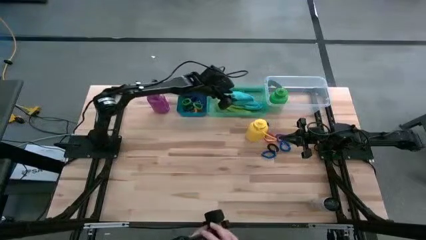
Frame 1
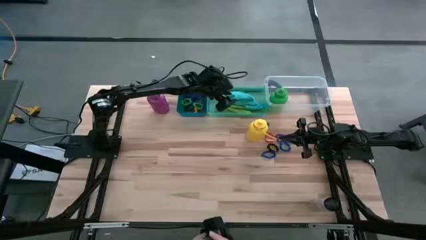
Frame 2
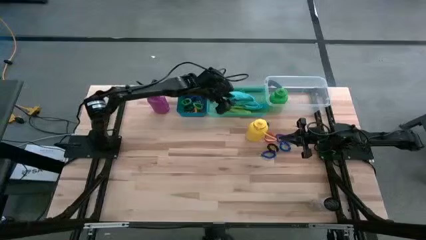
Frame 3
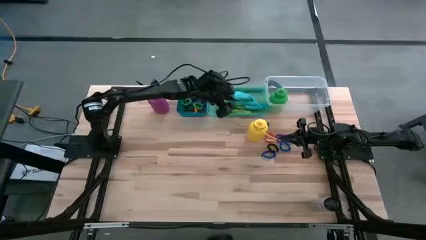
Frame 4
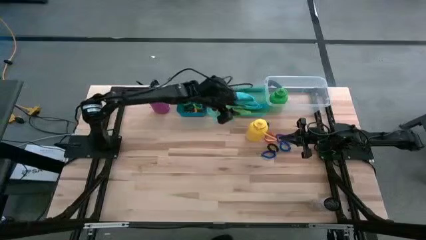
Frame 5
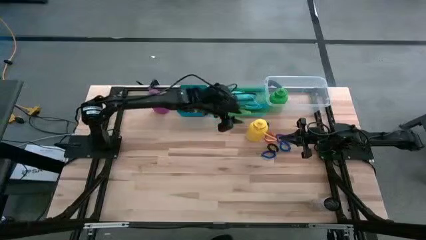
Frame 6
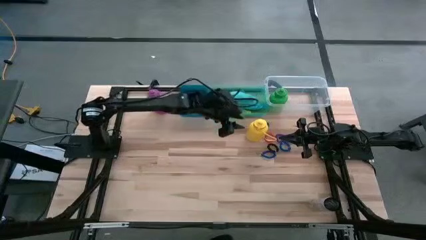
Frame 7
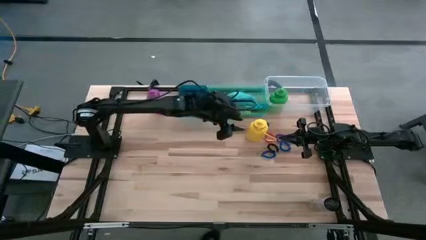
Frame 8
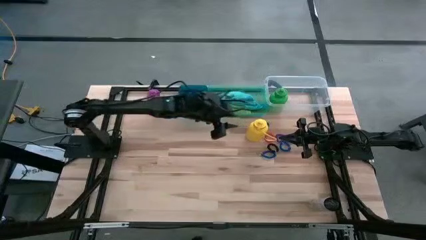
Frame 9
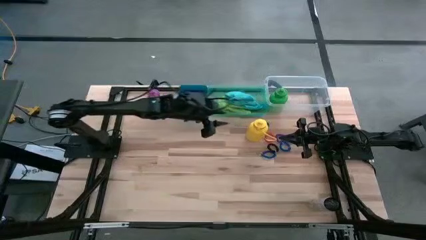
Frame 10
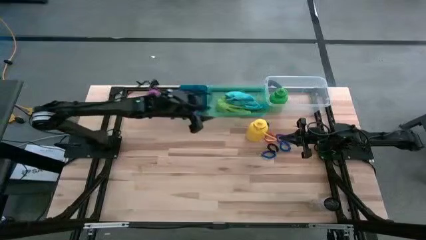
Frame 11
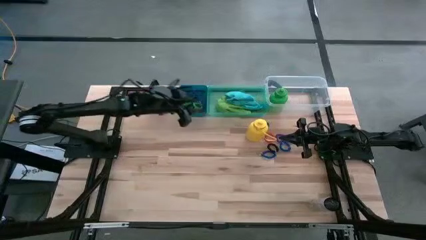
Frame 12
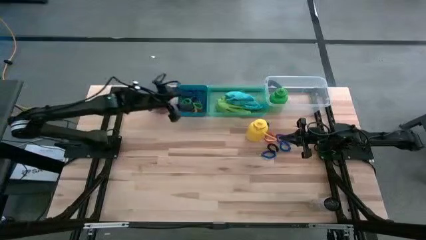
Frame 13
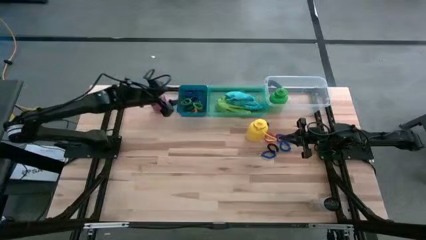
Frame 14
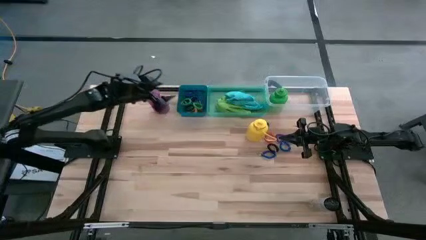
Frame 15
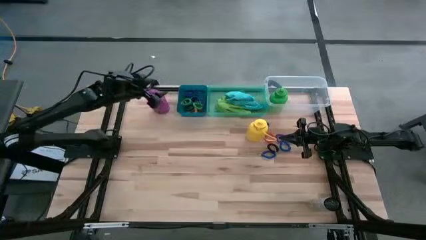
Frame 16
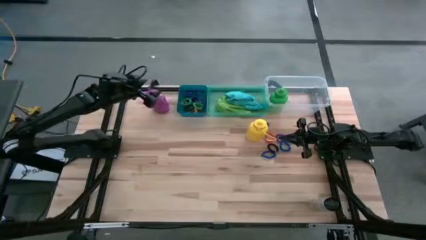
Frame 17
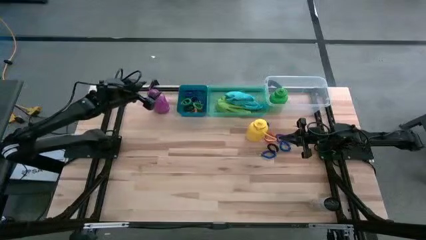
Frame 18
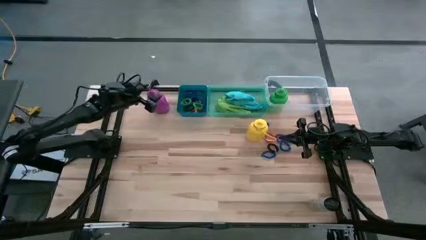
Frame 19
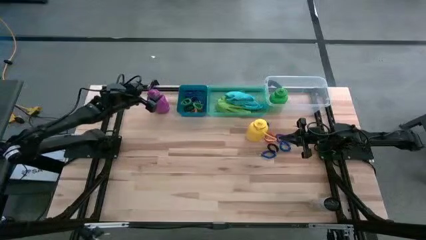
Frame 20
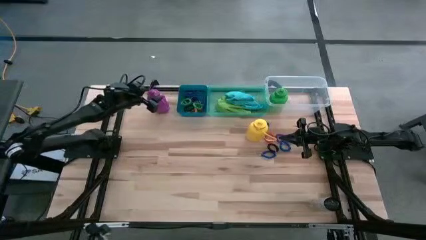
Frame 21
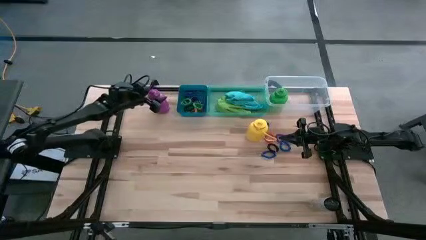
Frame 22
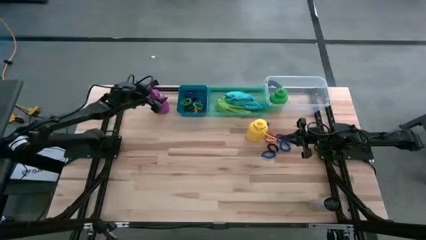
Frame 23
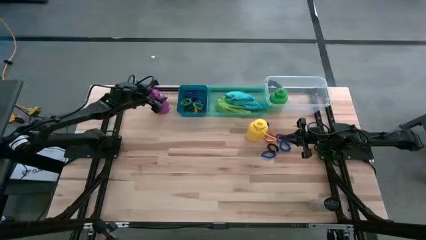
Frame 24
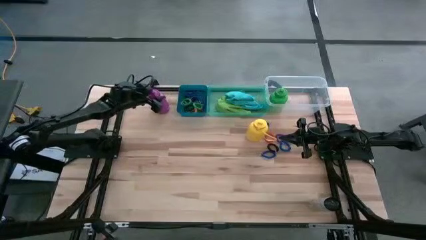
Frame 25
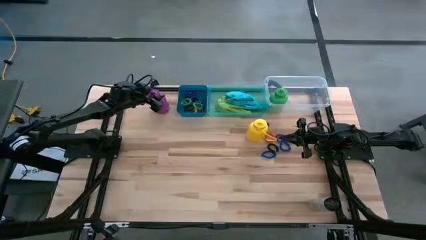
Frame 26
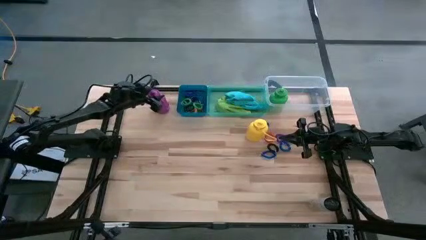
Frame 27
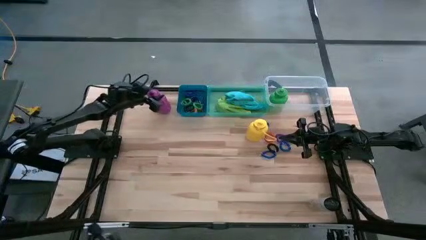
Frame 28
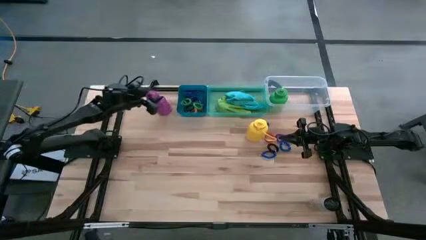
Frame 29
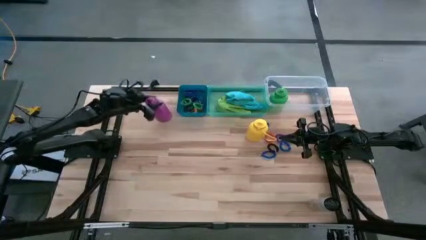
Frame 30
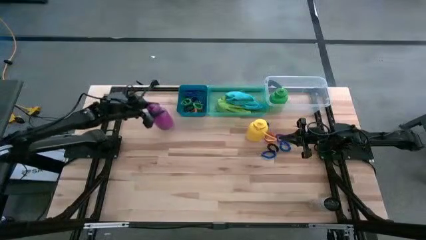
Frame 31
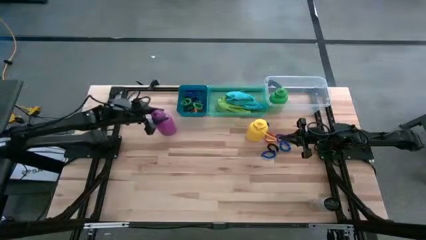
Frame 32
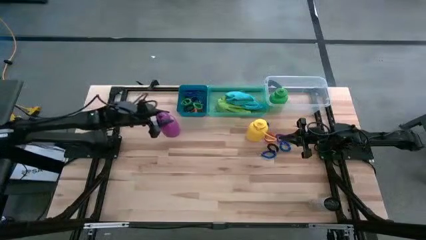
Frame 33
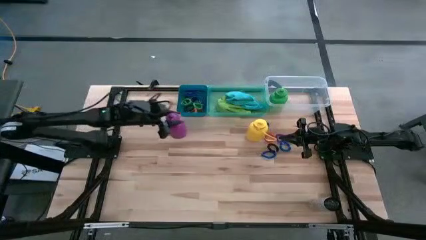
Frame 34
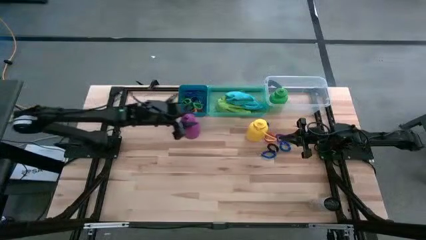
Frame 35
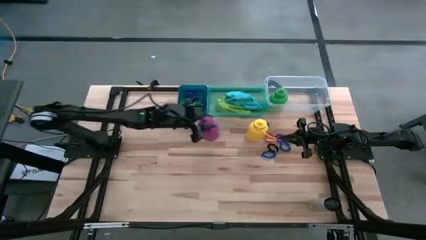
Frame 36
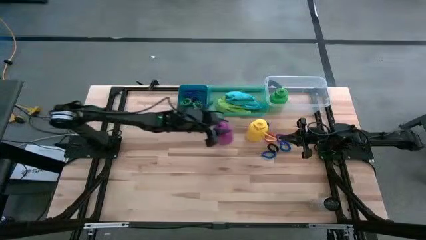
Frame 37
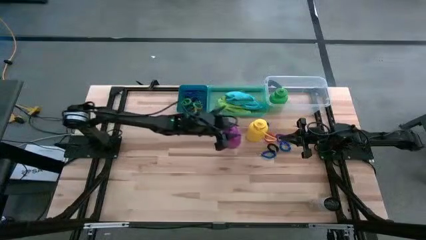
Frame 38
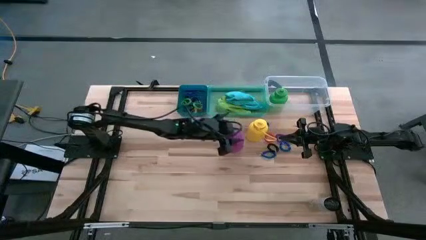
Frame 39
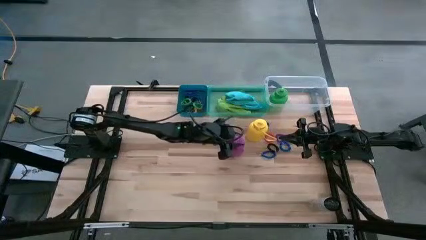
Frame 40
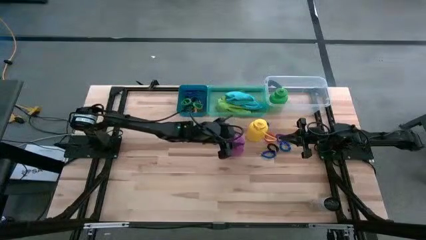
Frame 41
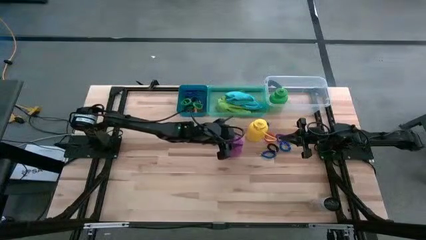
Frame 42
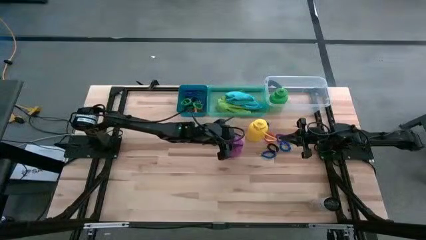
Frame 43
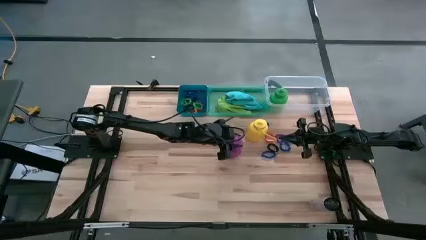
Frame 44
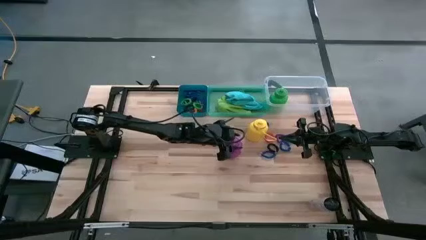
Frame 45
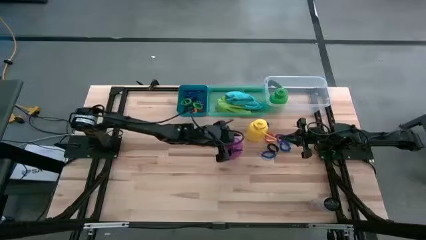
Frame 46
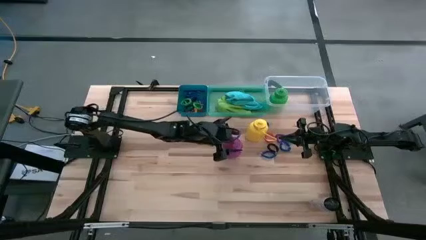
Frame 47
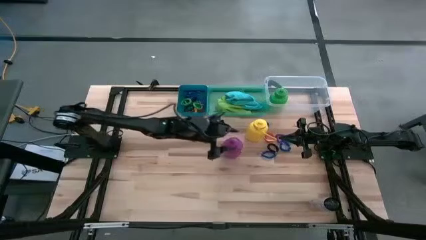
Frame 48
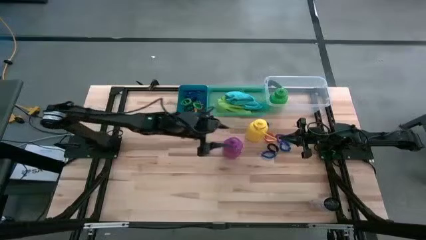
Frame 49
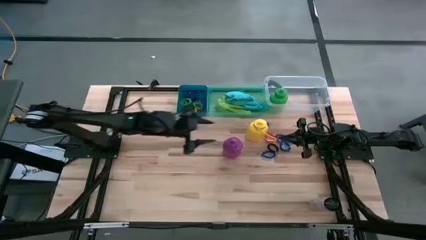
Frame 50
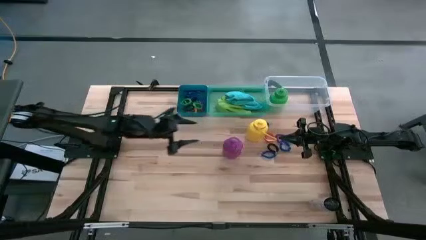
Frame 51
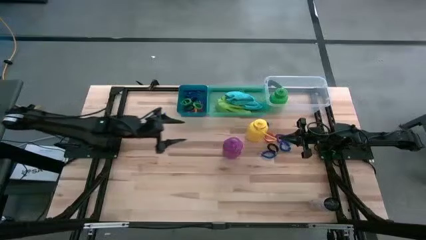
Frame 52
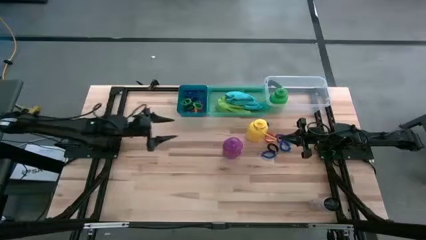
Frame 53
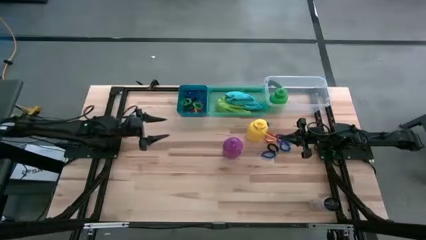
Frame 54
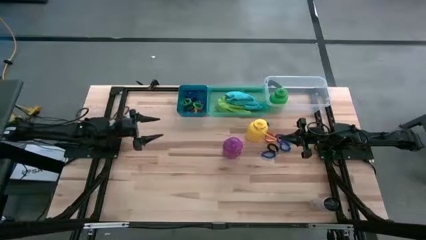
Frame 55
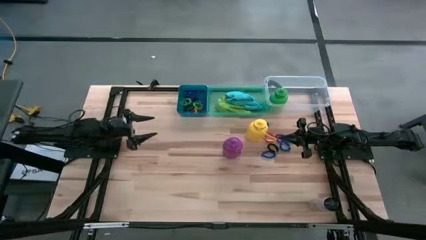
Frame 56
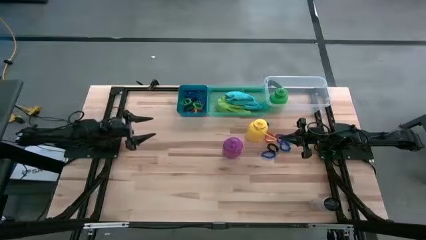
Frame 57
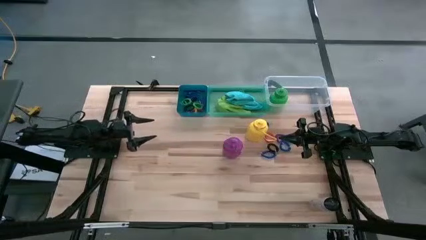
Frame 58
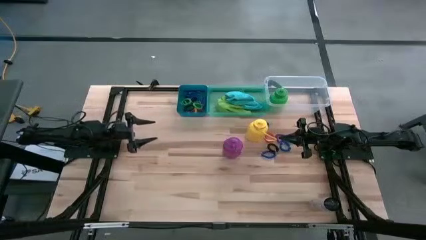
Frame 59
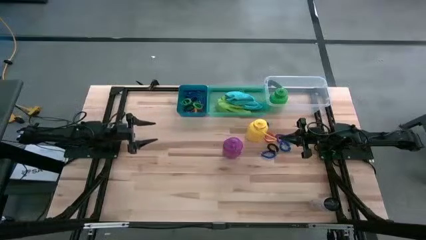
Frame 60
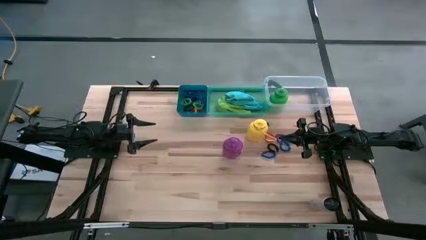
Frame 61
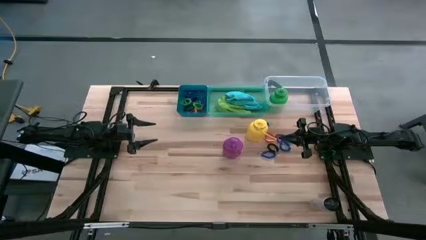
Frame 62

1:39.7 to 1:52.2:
Task: Pick & Place Sports Items
Put the violet tumbler into the transparent bin

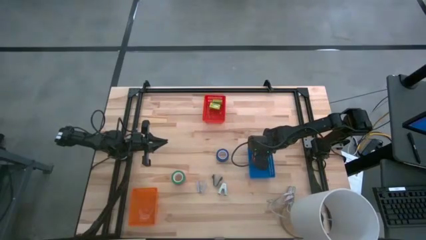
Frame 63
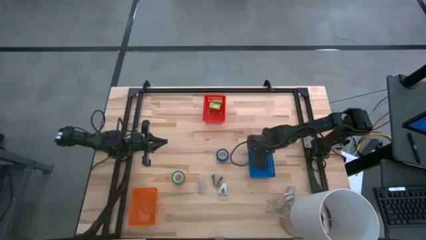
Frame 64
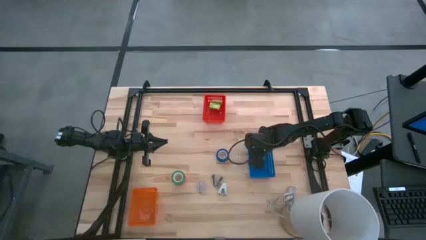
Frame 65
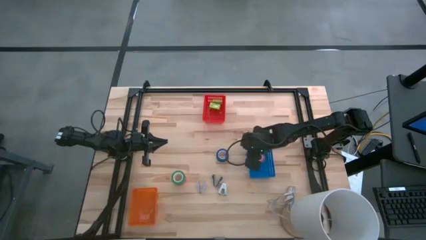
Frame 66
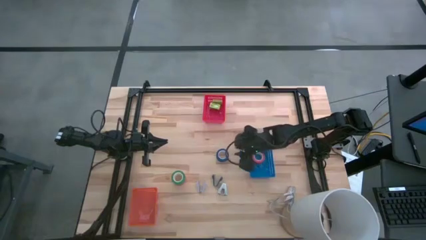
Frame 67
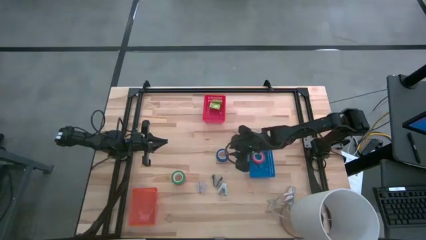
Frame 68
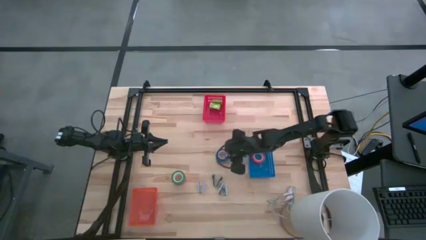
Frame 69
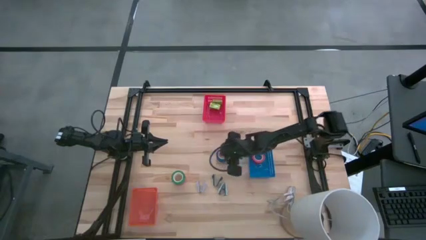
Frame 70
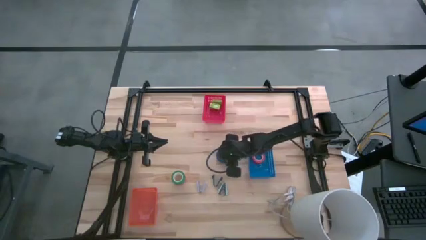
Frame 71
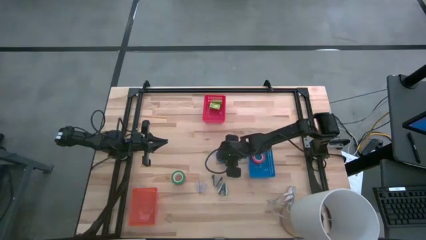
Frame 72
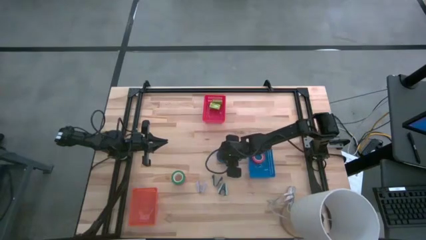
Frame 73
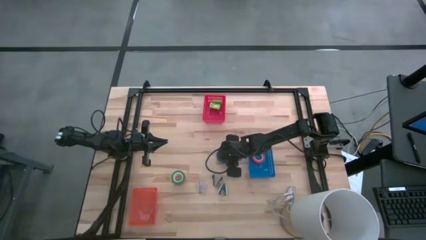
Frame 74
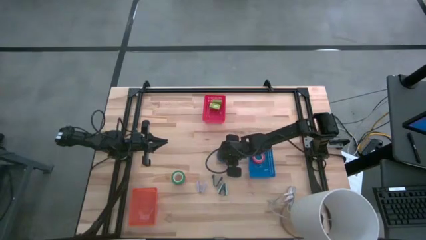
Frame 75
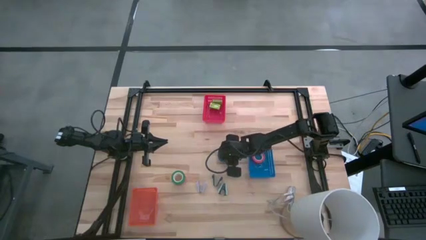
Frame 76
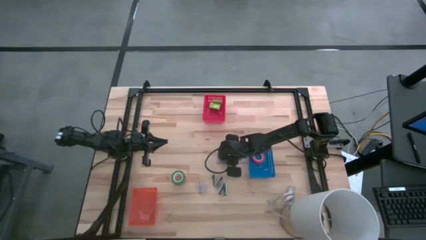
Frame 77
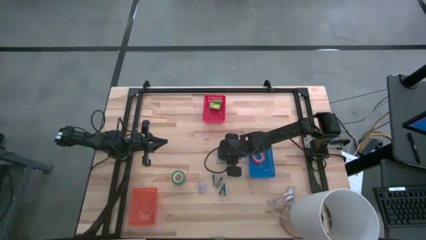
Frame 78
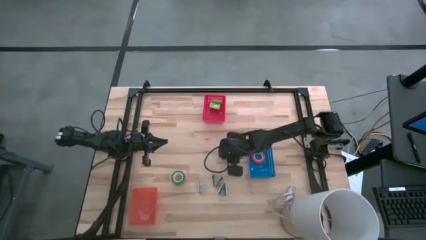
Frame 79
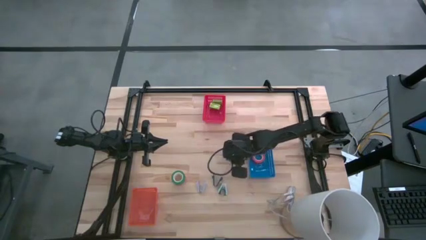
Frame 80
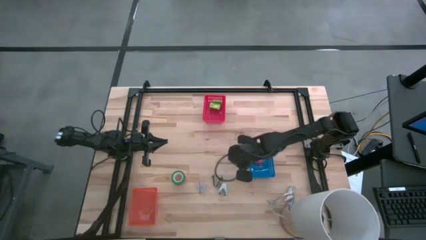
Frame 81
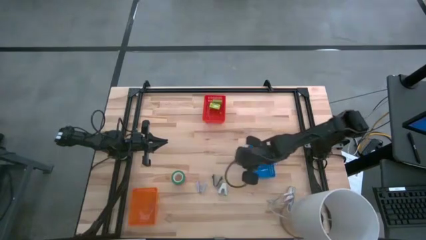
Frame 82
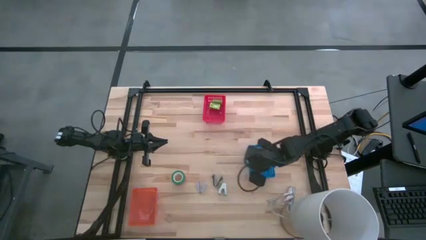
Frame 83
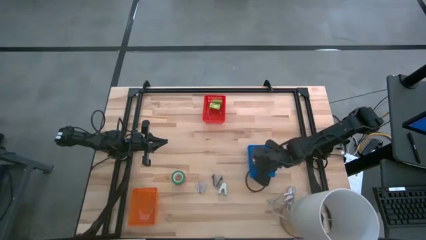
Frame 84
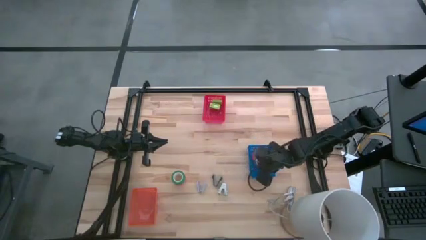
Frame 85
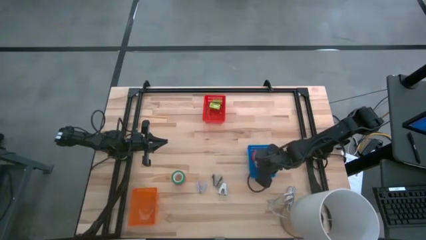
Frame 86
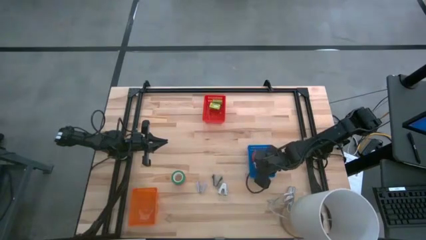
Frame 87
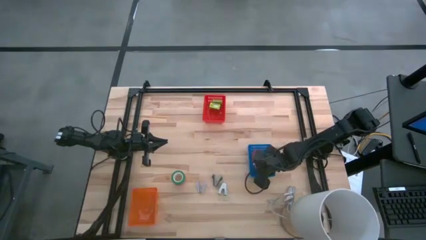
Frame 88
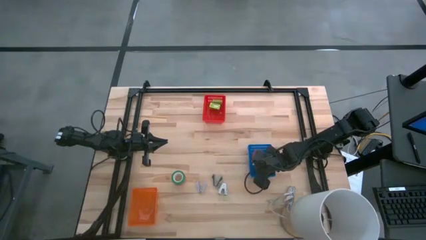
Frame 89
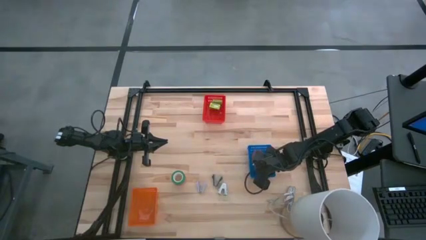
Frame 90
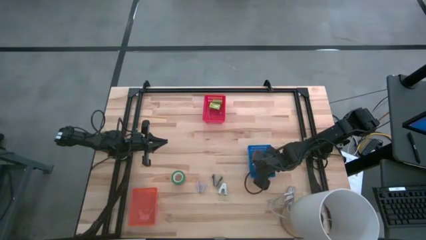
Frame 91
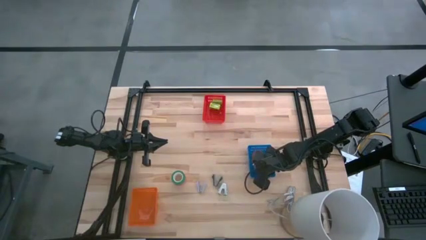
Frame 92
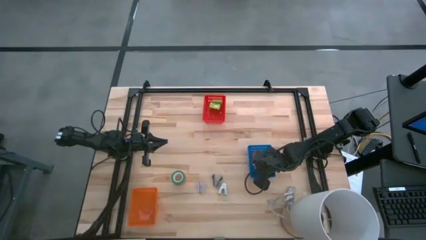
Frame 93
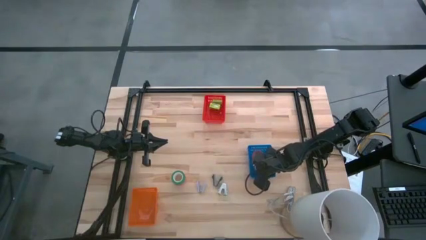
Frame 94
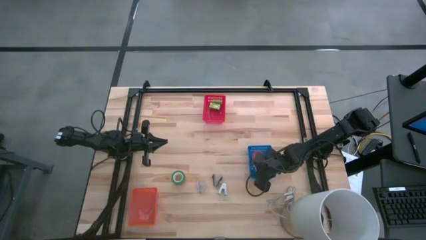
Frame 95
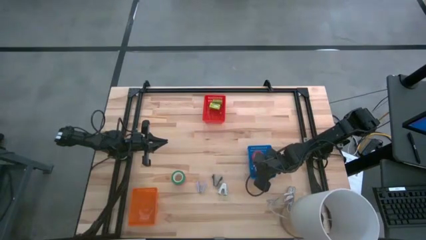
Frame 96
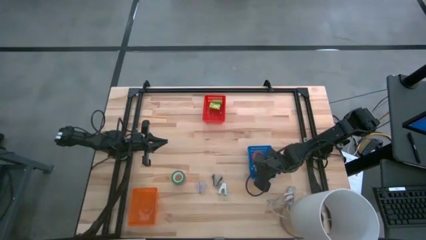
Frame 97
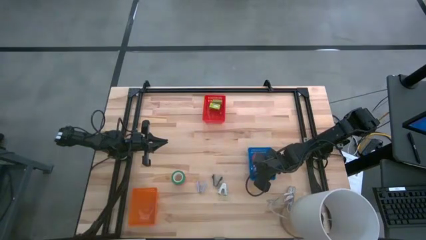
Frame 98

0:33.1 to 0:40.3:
Task: Pick and place Stapler, Stapler remover, tape
Put the blue tape into the blue bin
